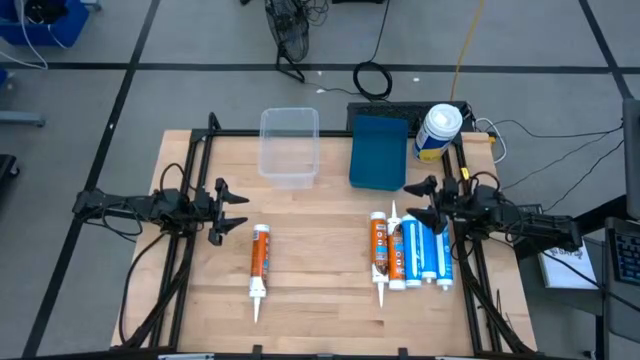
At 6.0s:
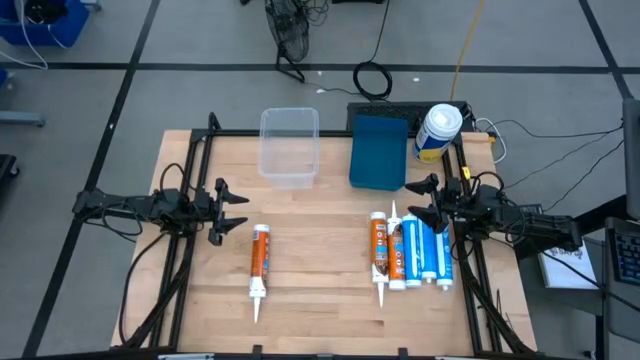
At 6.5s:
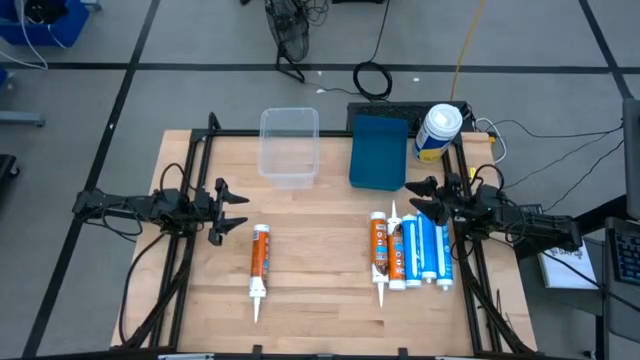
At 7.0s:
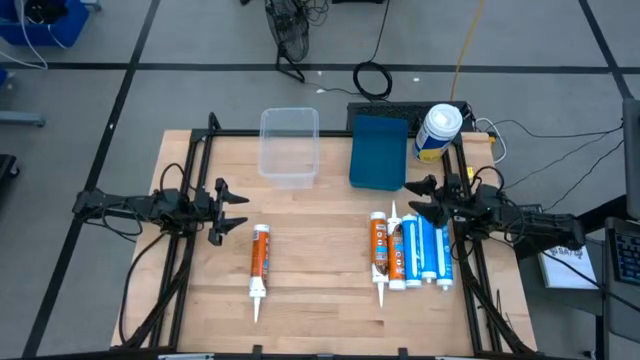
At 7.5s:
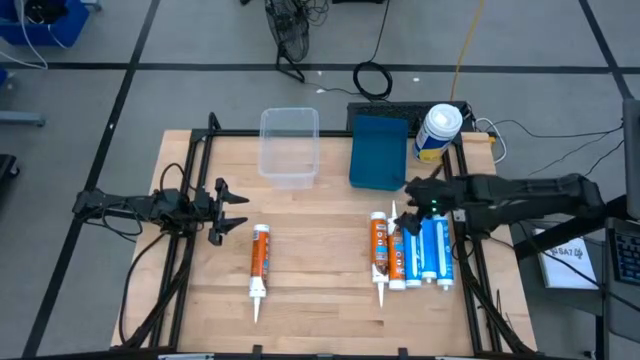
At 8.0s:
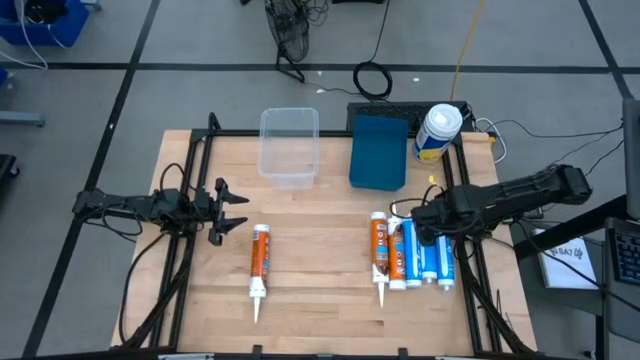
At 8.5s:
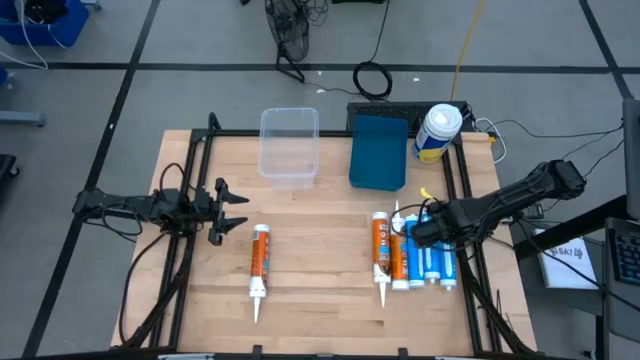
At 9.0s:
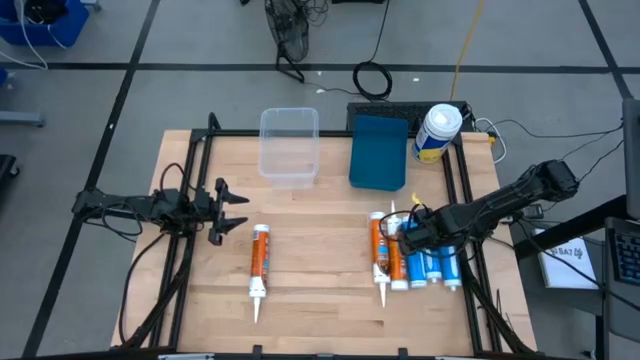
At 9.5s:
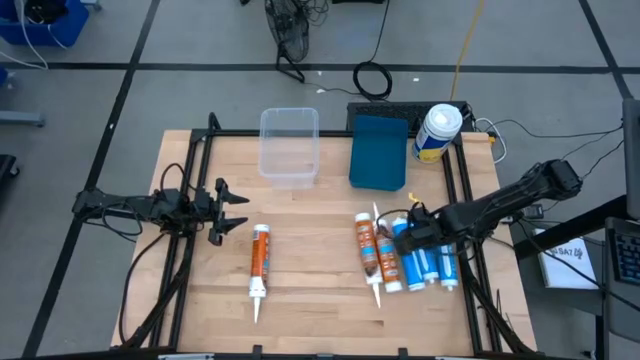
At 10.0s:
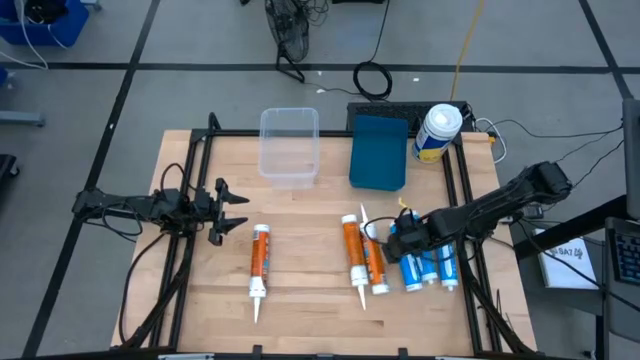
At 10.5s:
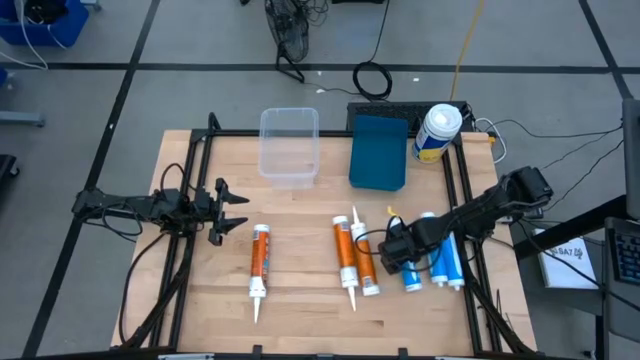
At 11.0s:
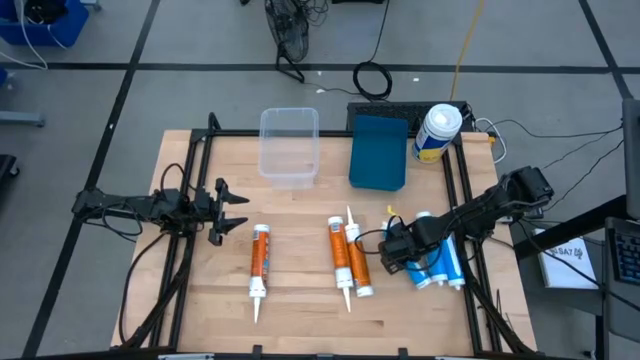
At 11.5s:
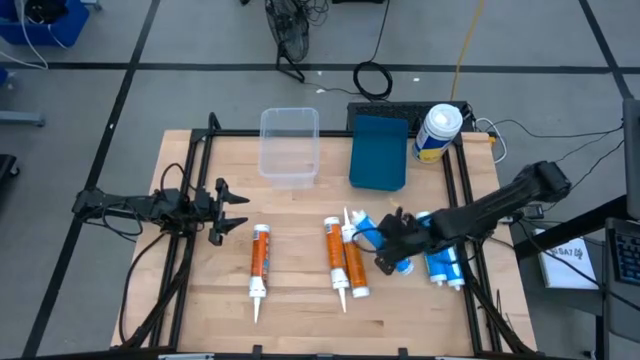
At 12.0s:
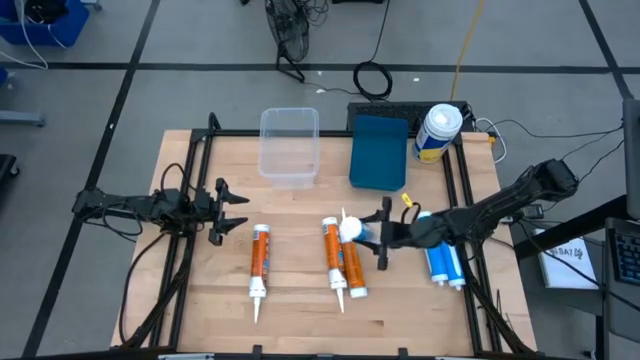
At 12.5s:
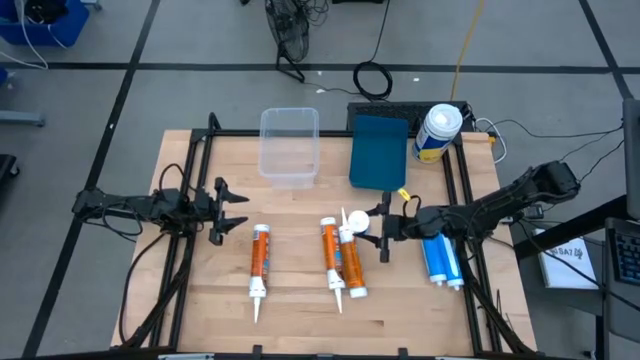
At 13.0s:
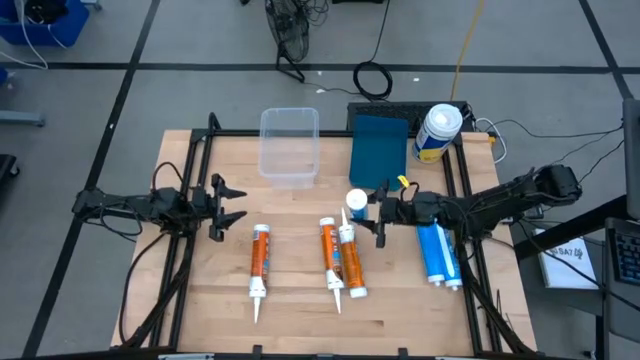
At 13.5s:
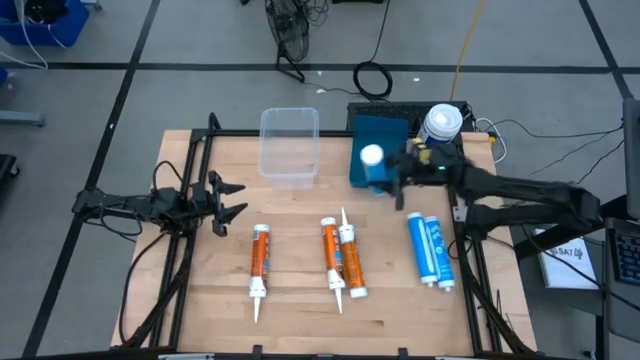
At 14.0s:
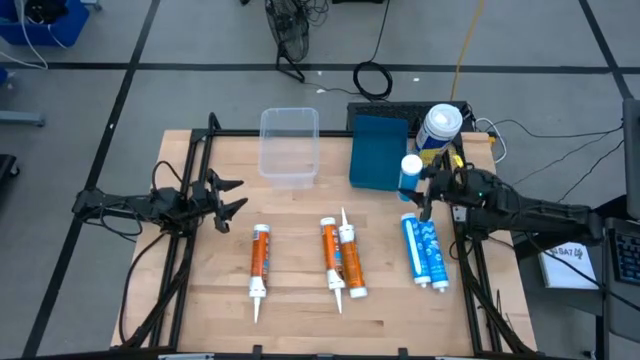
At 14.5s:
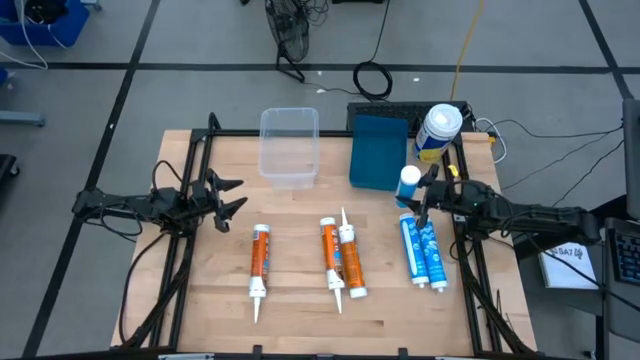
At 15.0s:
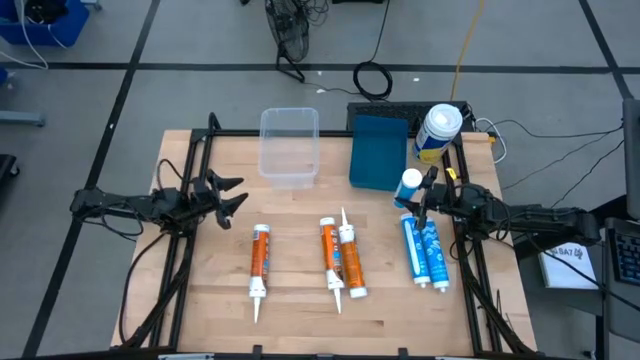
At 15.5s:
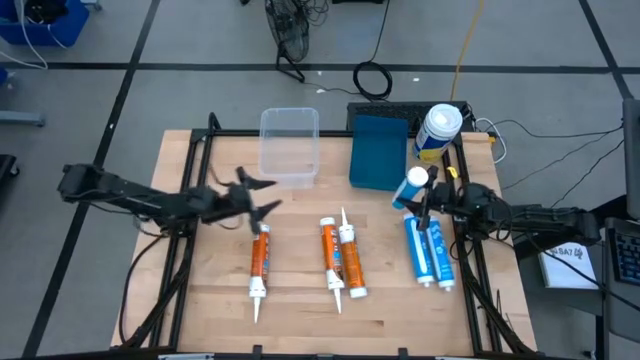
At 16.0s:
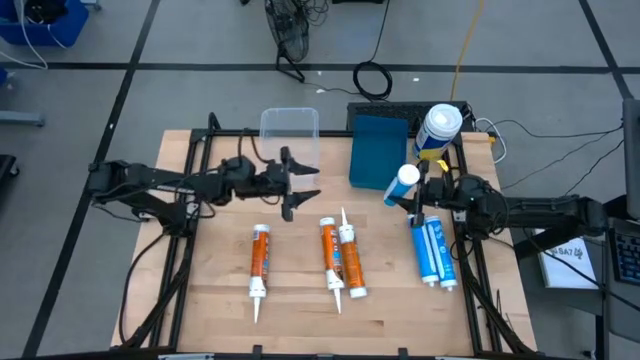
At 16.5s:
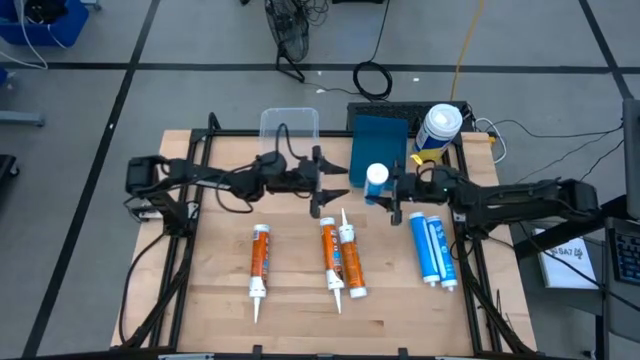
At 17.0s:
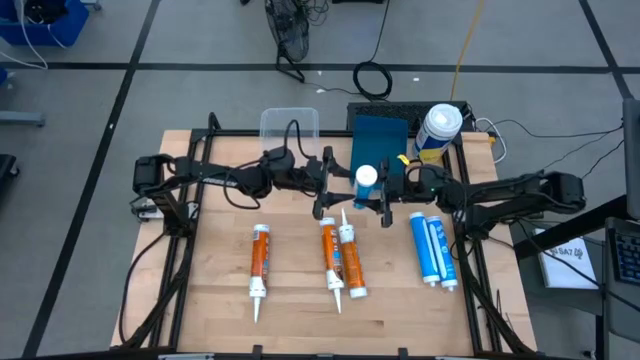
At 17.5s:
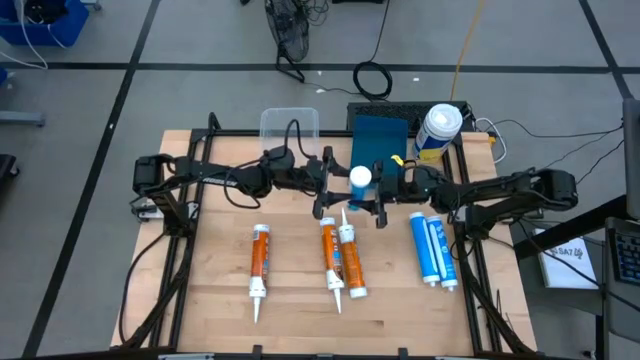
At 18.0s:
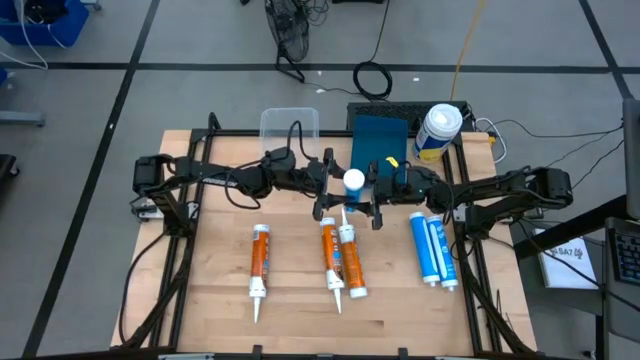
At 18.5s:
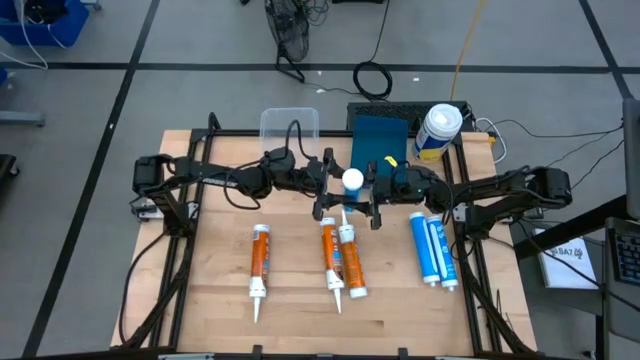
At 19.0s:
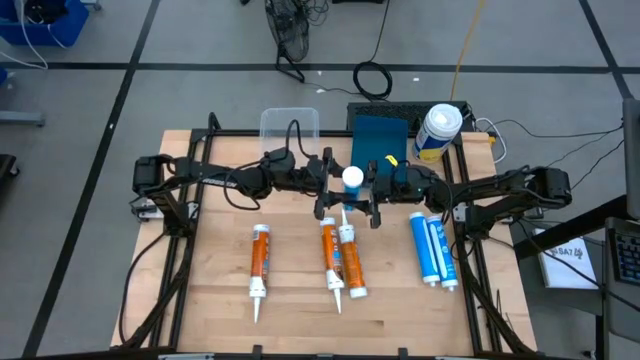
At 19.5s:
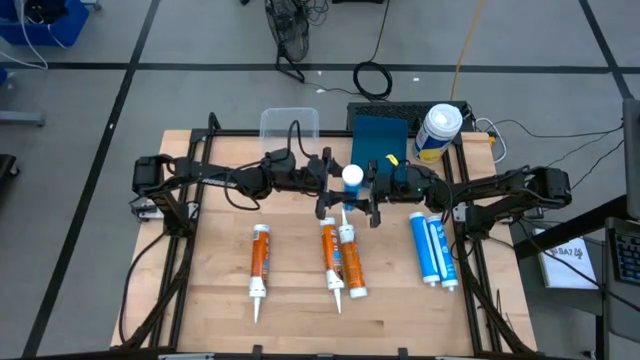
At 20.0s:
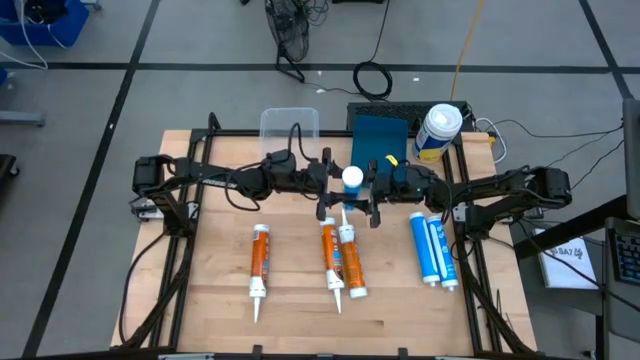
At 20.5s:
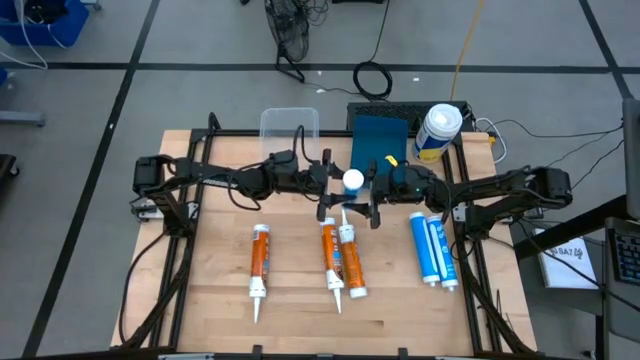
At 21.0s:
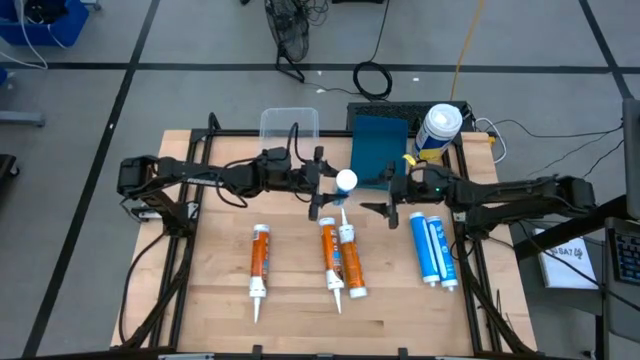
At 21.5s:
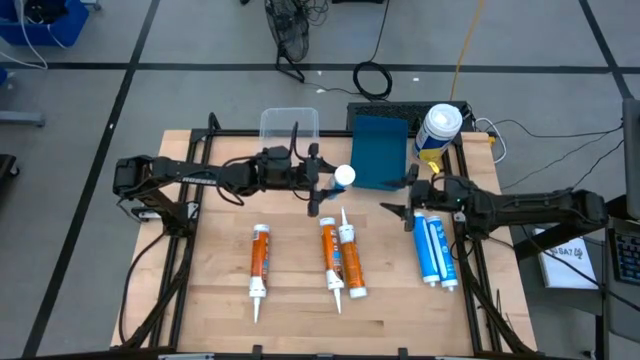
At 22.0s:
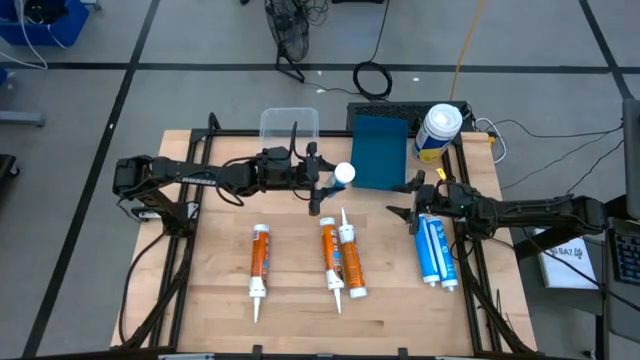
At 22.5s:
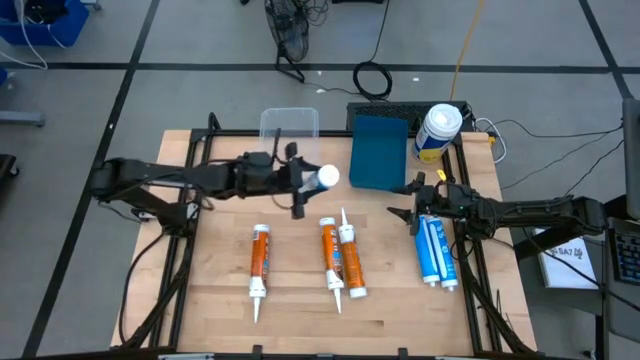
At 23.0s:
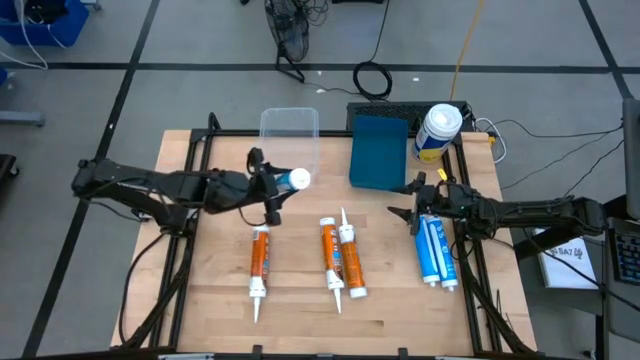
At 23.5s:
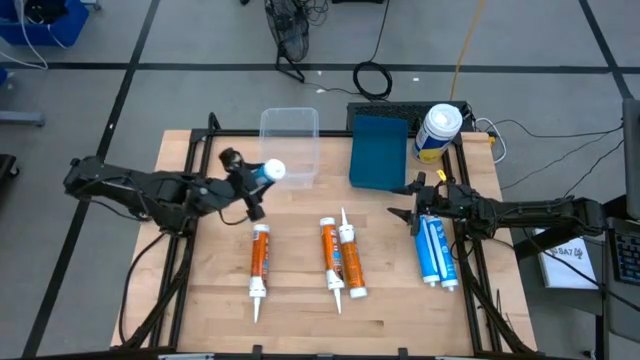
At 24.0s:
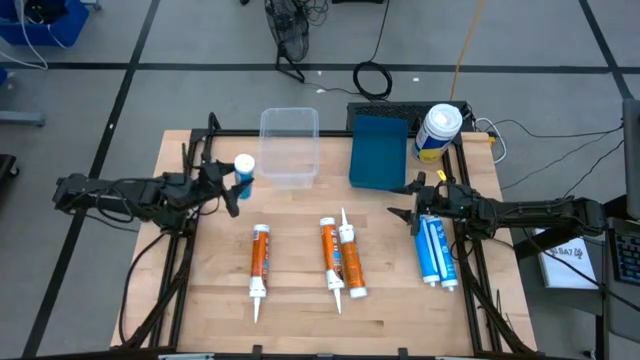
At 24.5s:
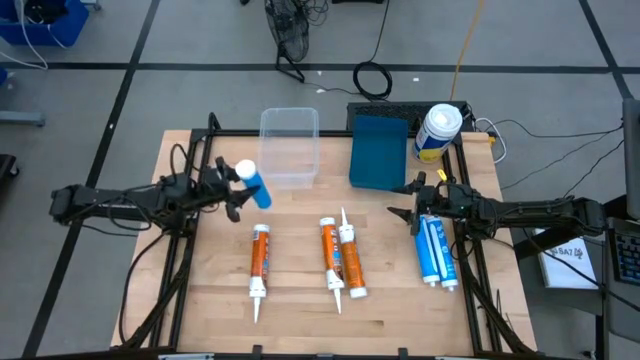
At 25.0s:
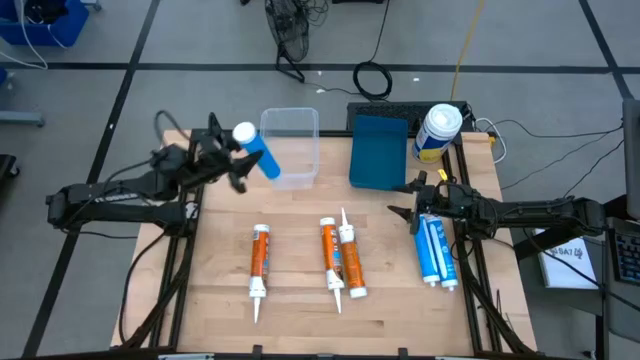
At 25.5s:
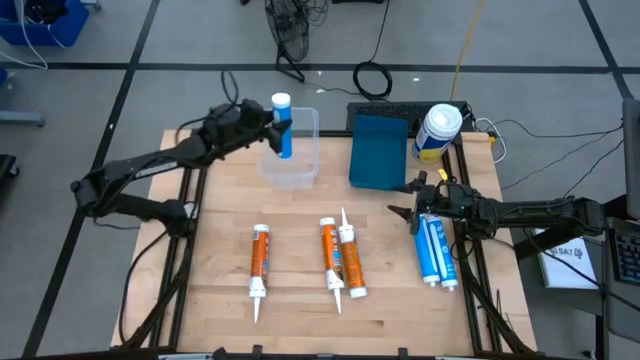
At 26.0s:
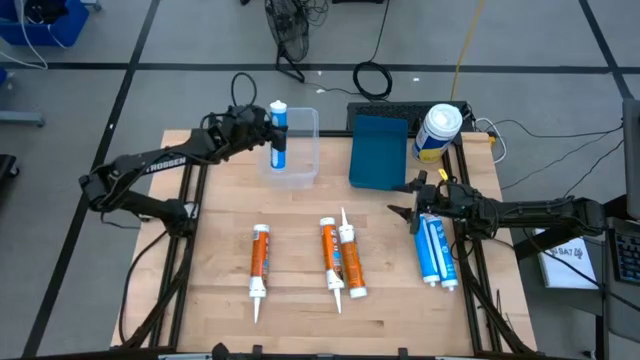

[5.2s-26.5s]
Task: Pick & place silicon tubes, Sealant and Lysol wipes
Put the left blue sealant into the transparent bin
